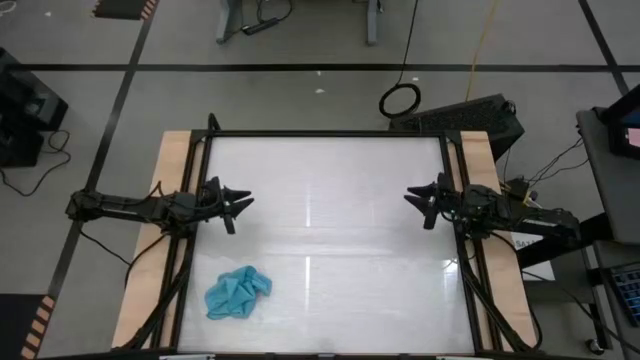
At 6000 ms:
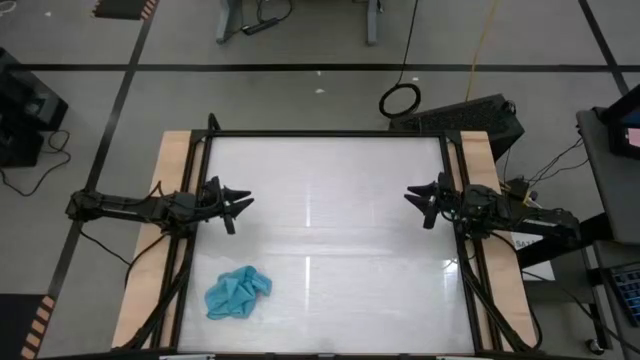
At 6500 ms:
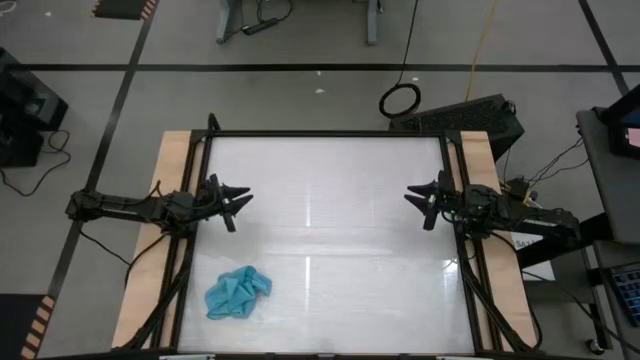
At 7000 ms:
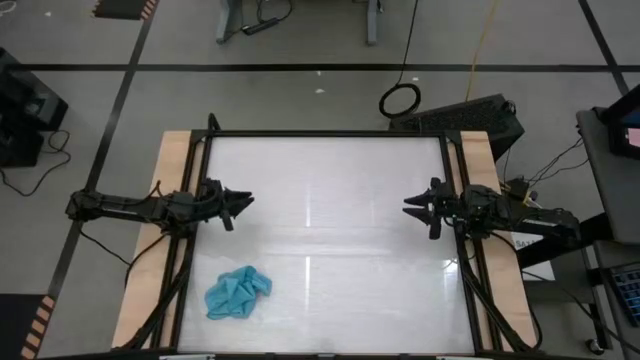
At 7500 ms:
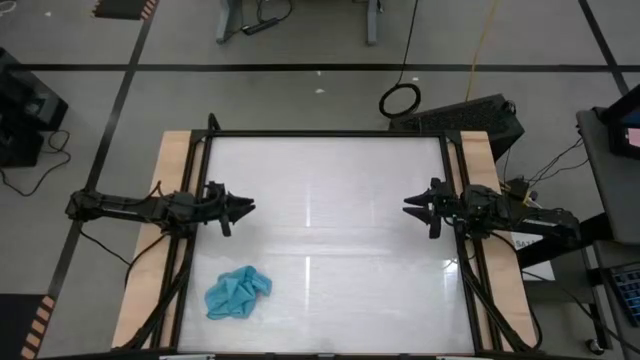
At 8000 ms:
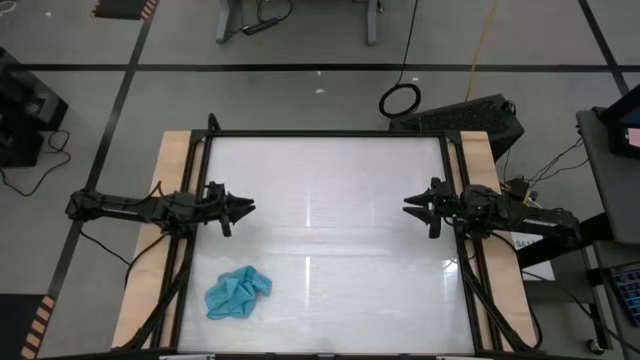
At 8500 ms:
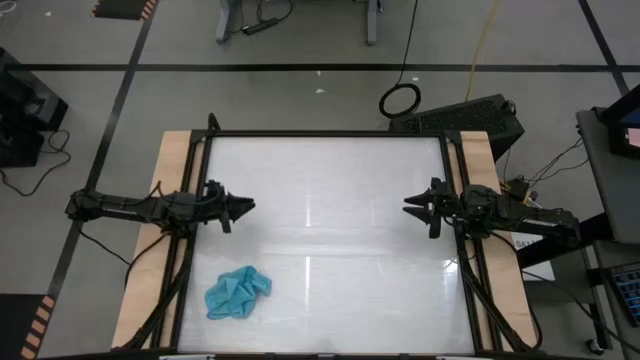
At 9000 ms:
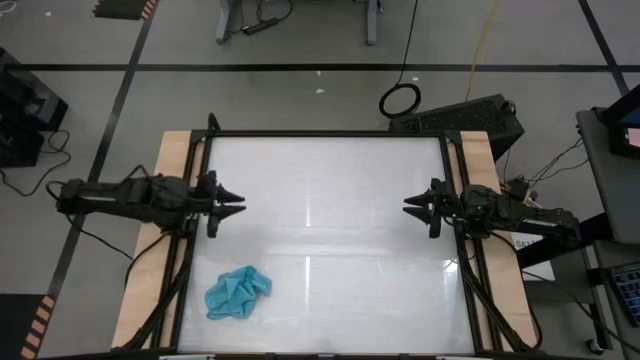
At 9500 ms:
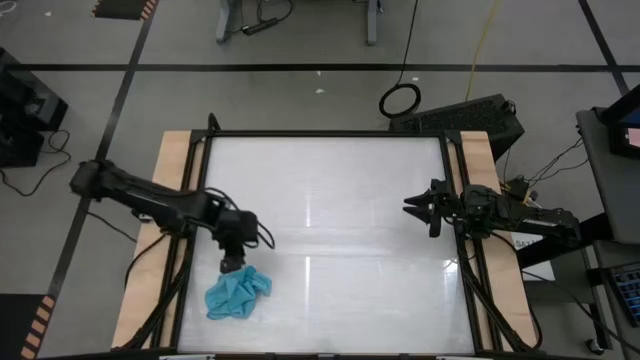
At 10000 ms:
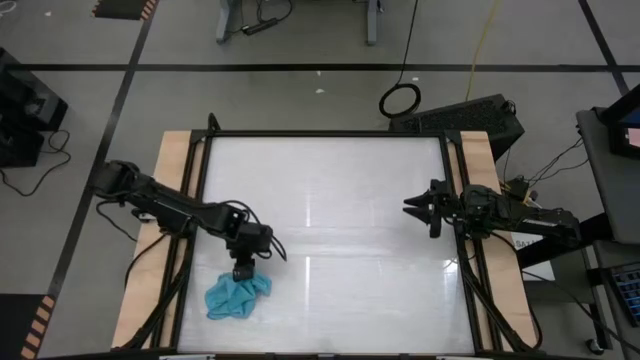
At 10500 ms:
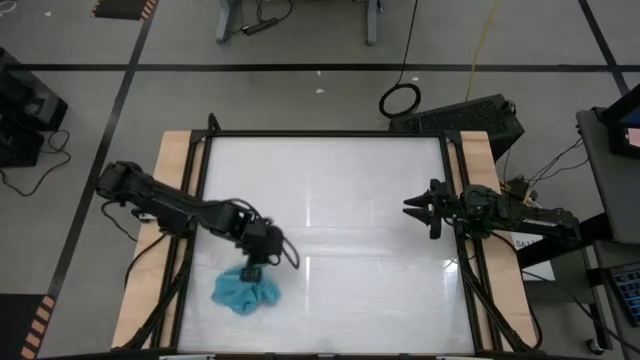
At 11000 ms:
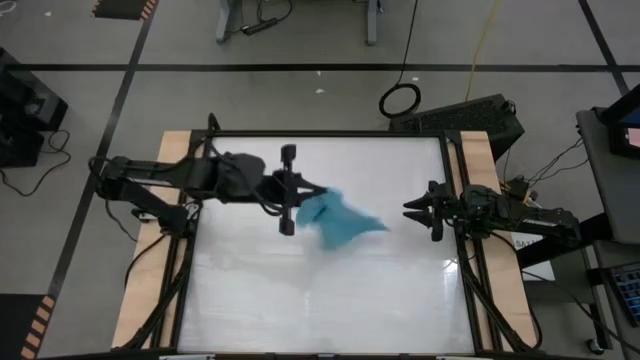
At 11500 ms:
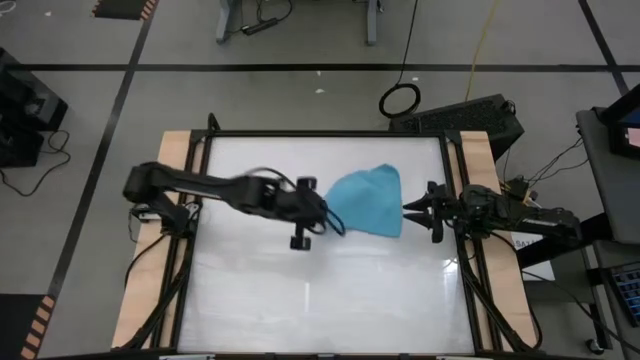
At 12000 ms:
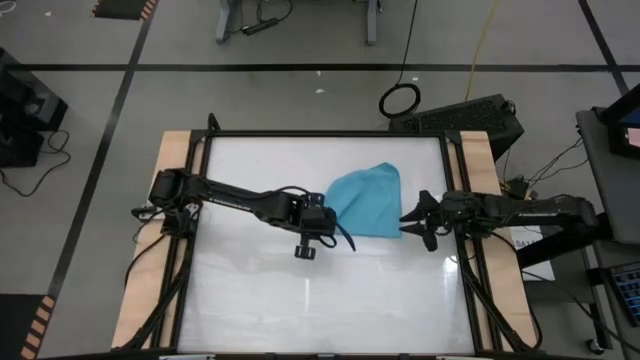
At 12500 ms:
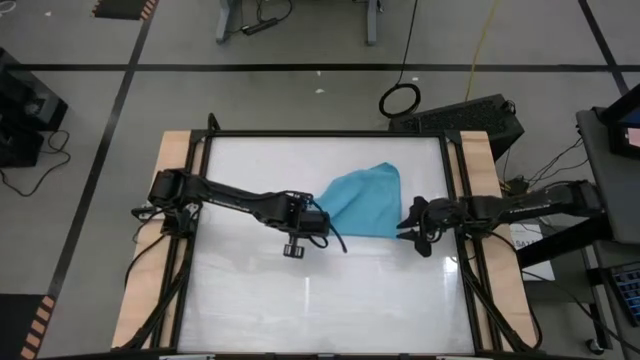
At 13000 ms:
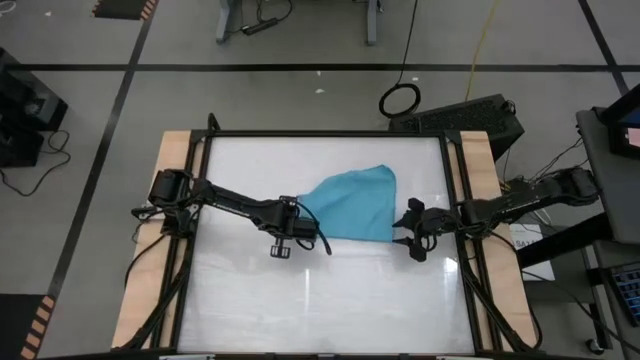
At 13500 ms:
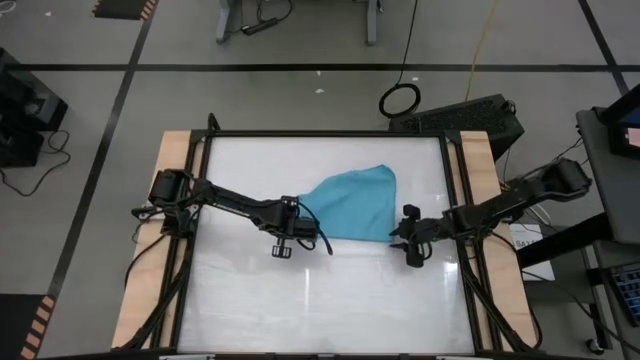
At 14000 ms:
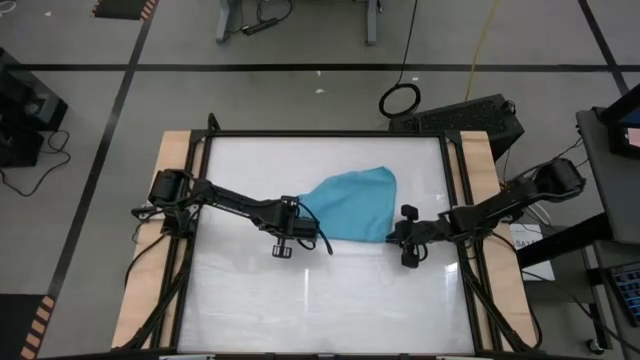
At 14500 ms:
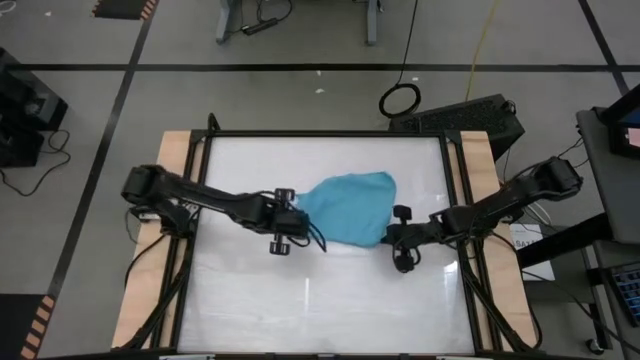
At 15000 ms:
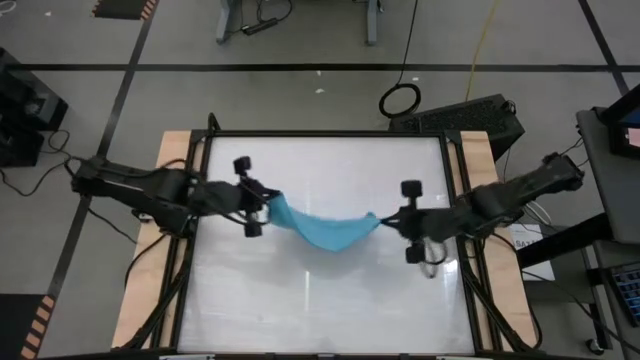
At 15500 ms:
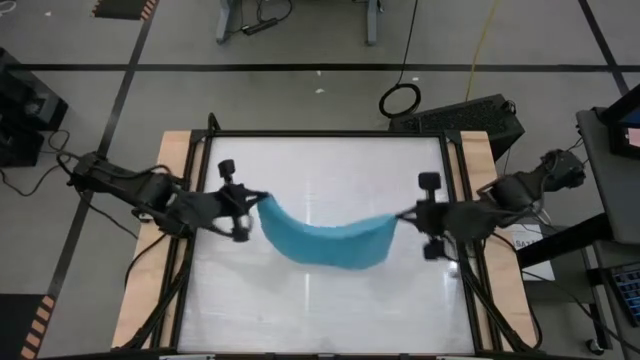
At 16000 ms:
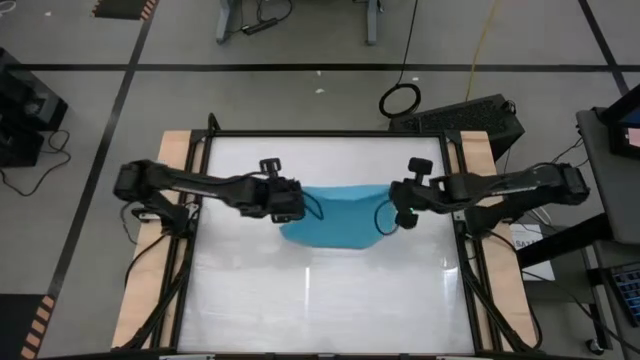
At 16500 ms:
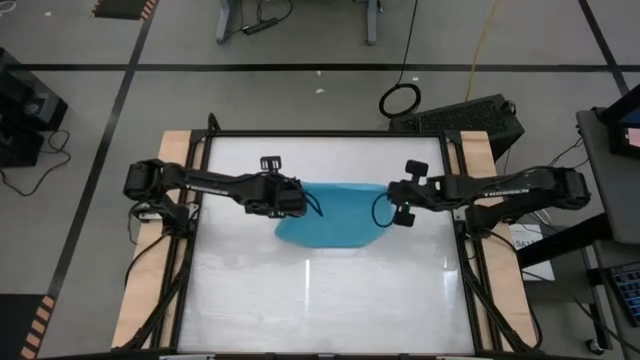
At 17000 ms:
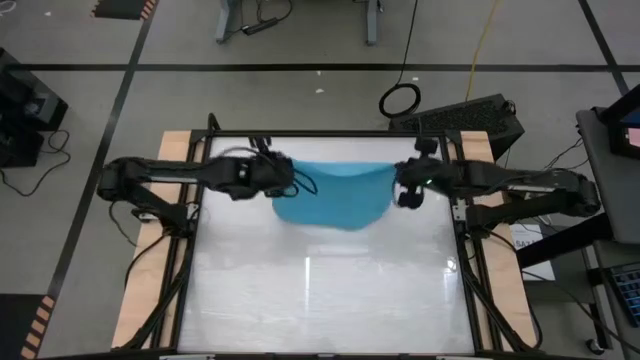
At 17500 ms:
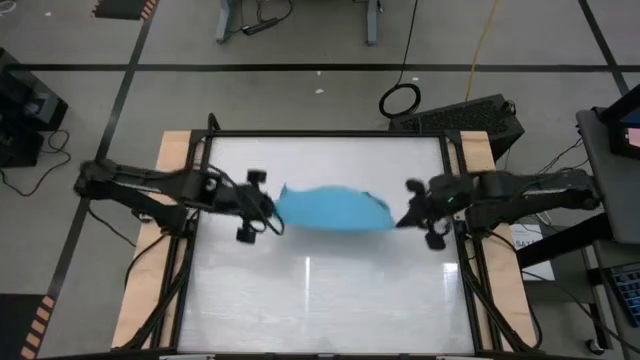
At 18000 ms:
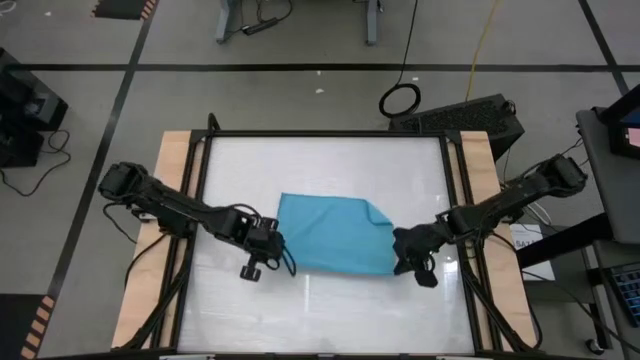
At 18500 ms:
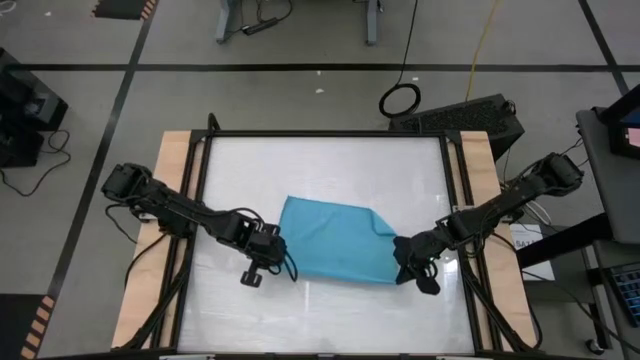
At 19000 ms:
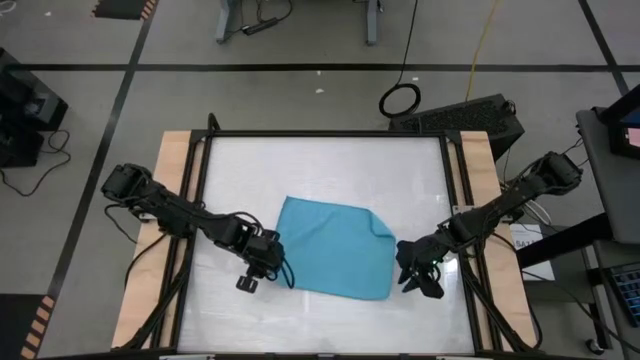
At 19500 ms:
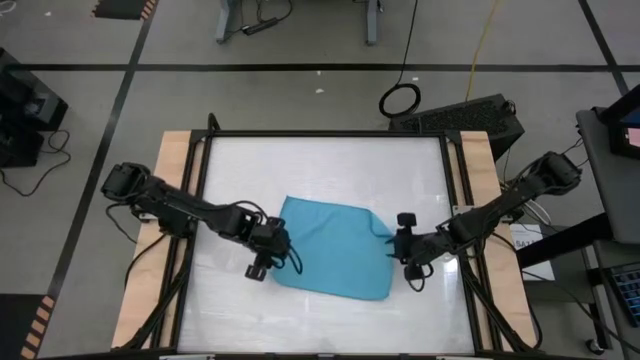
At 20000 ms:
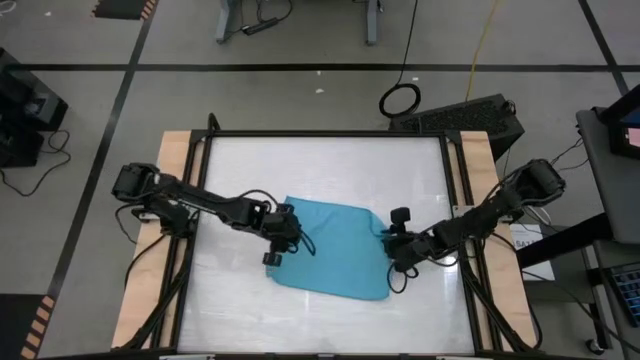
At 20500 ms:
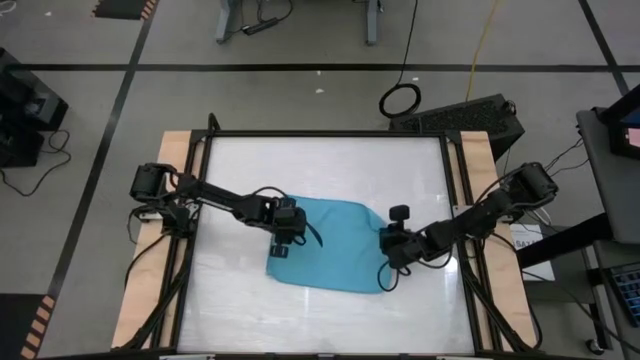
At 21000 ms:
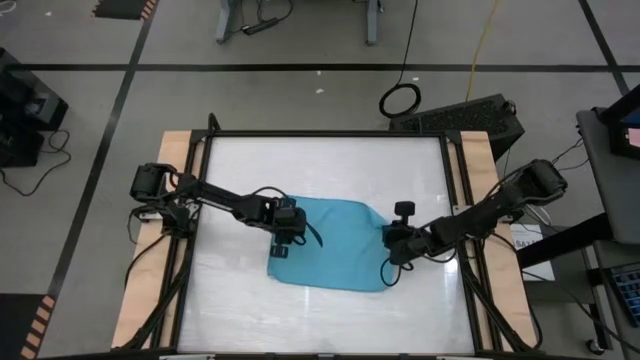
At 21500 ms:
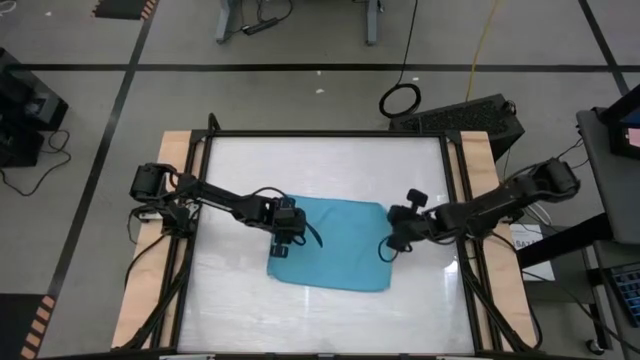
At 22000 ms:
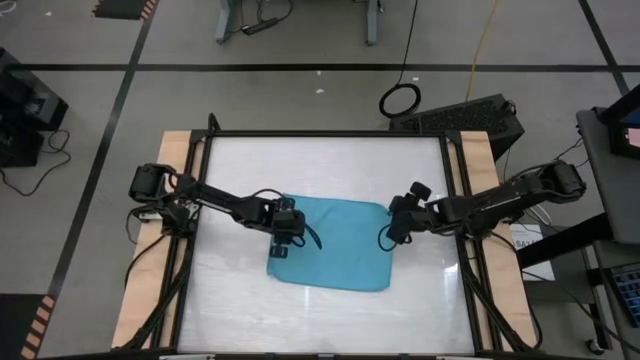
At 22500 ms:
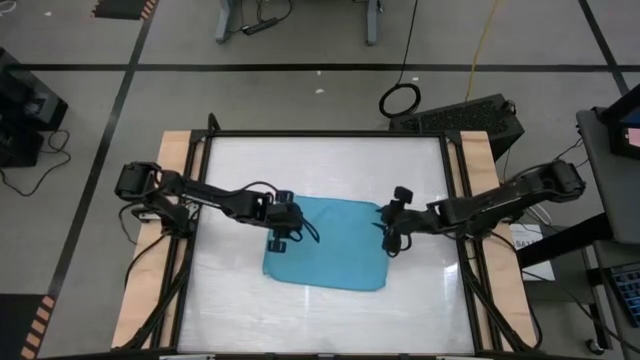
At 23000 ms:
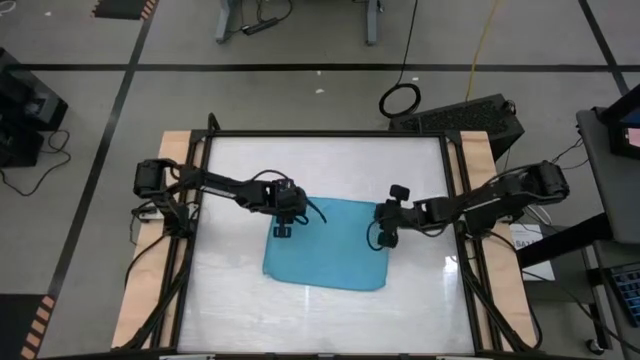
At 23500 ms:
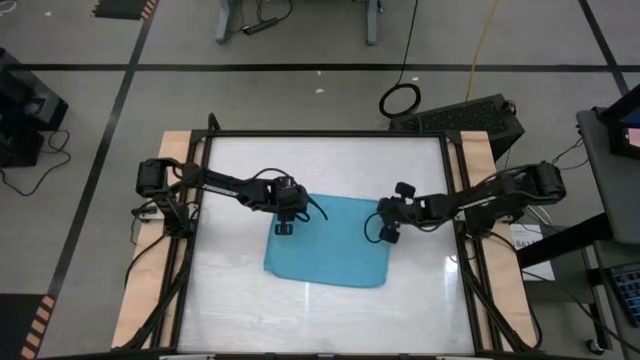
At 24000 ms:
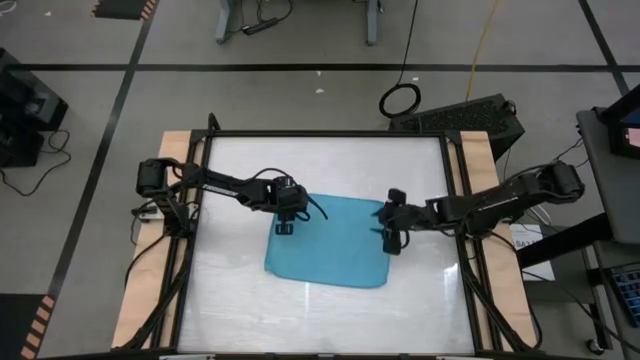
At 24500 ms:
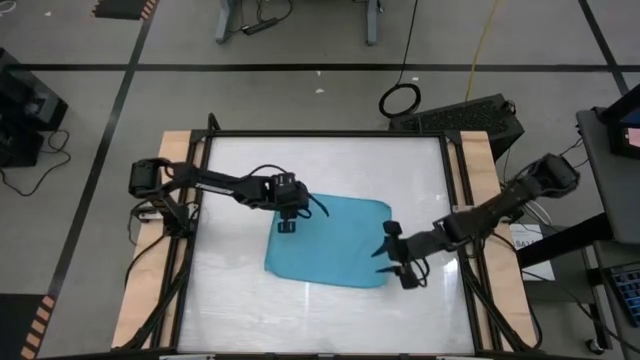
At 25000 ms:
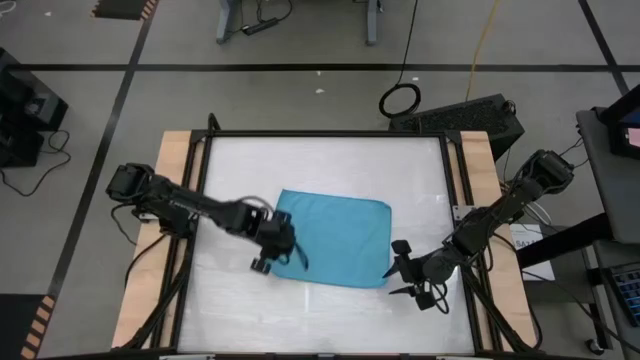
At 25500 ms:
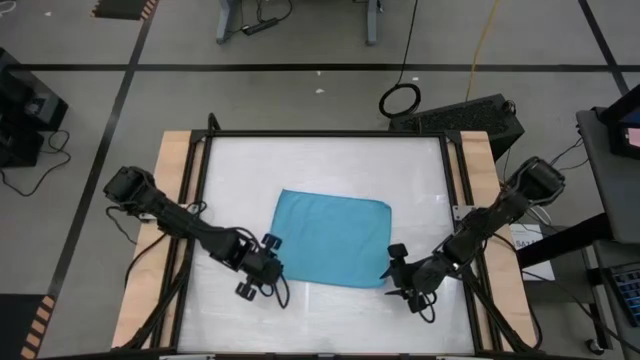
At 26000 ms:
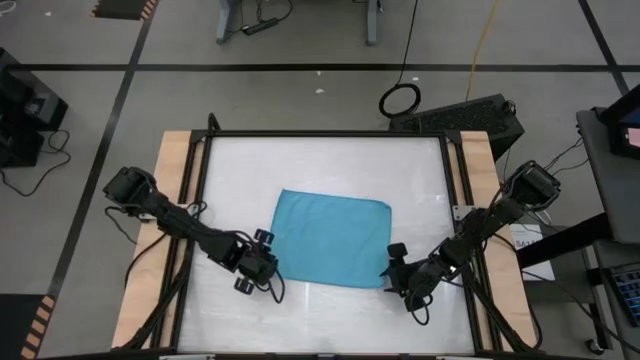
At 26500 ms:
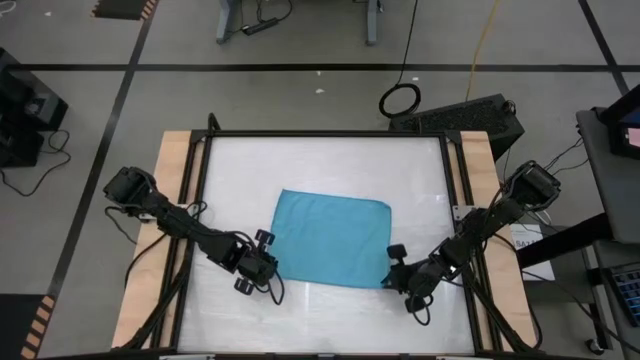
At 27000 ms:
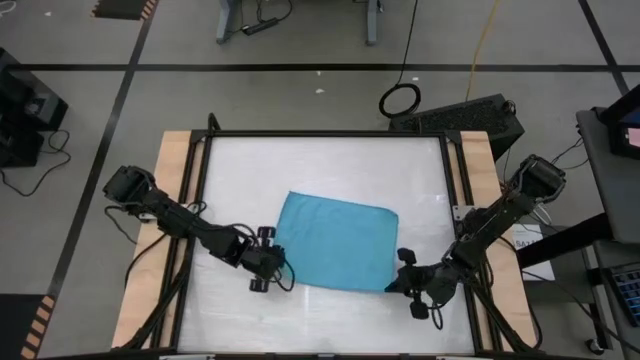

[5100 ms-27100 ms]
Task: Roll towel
Roll the blue towel
